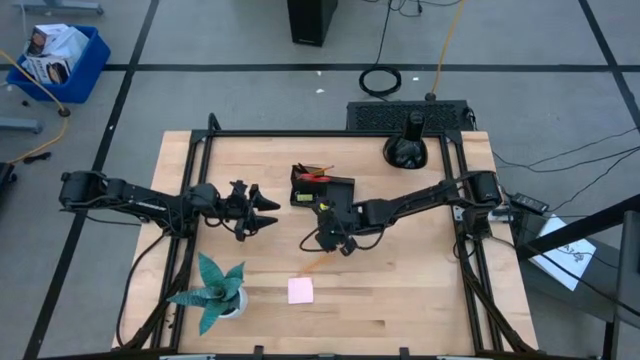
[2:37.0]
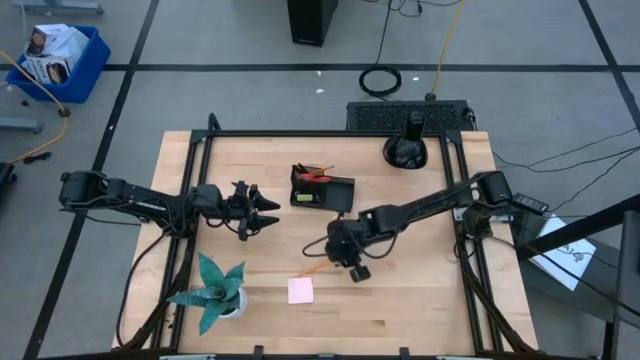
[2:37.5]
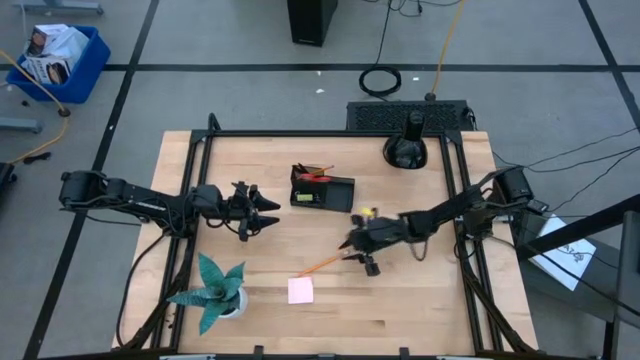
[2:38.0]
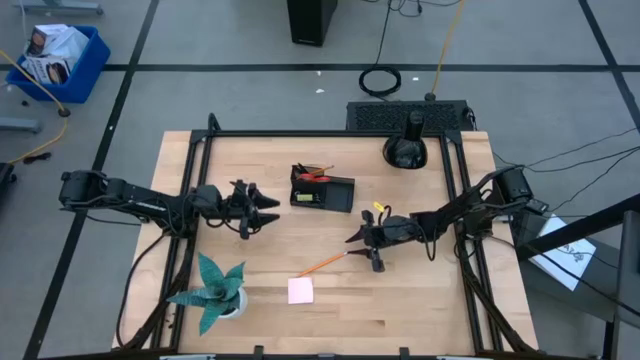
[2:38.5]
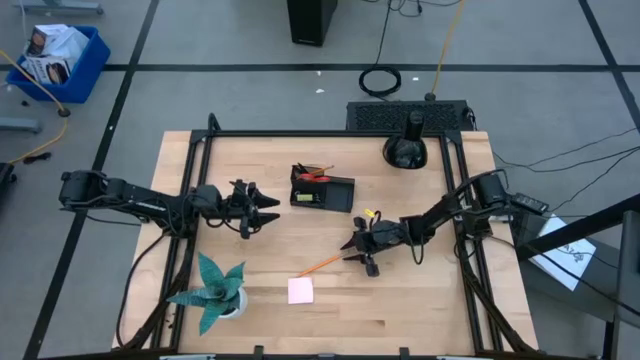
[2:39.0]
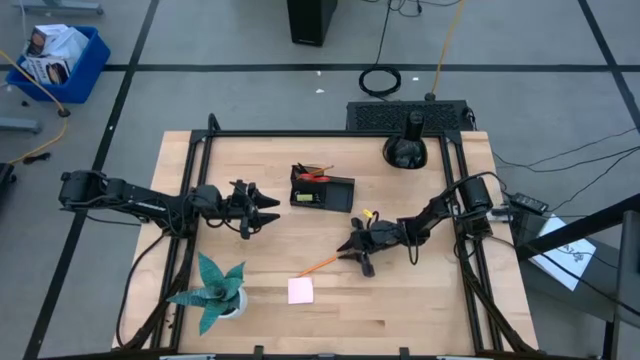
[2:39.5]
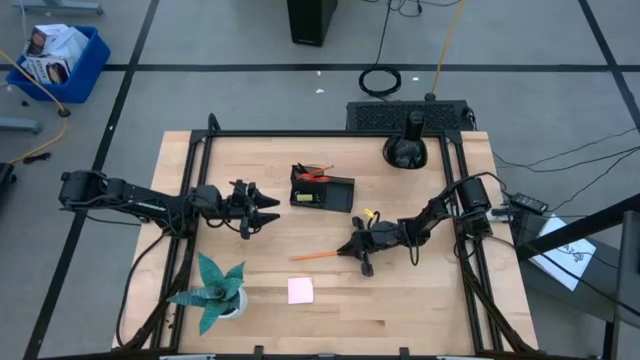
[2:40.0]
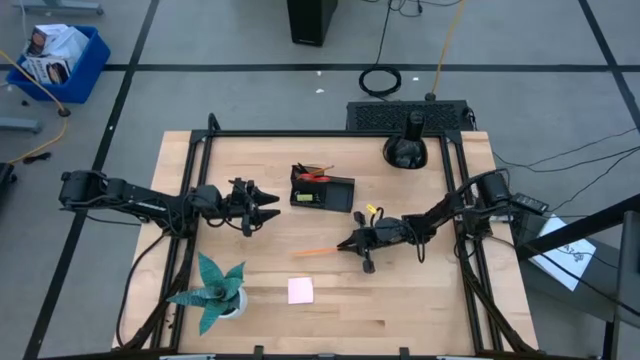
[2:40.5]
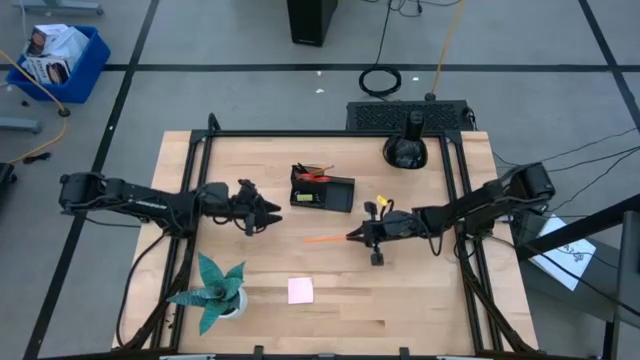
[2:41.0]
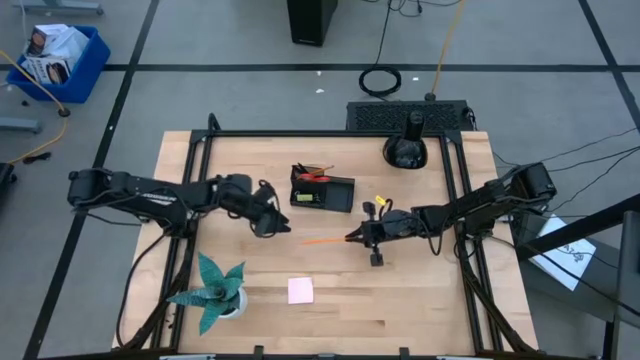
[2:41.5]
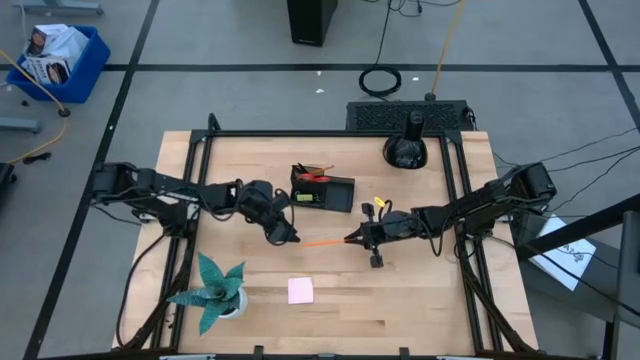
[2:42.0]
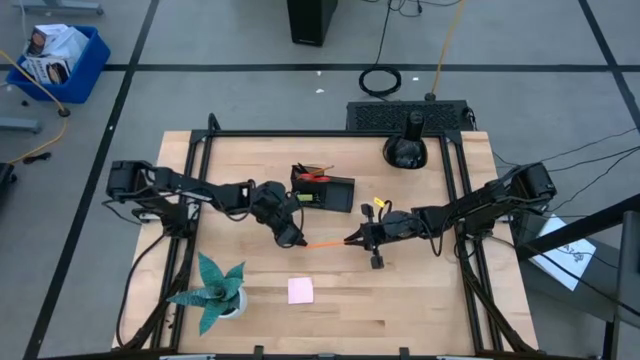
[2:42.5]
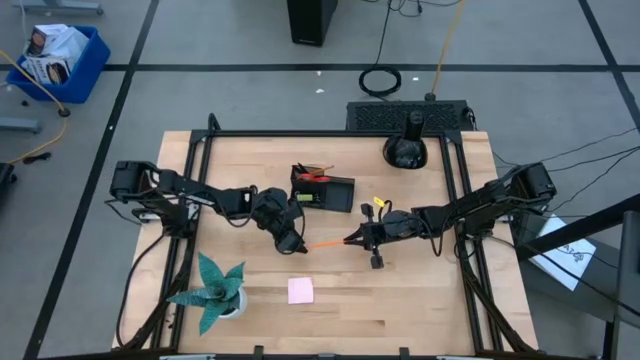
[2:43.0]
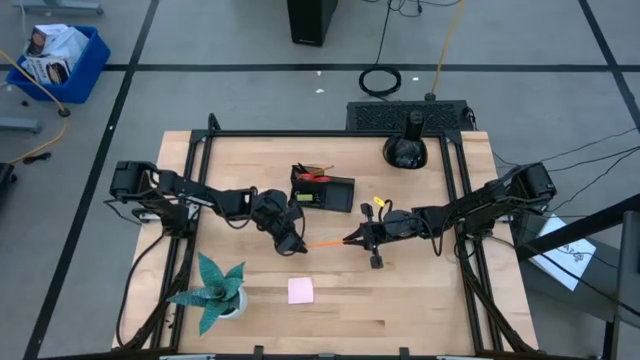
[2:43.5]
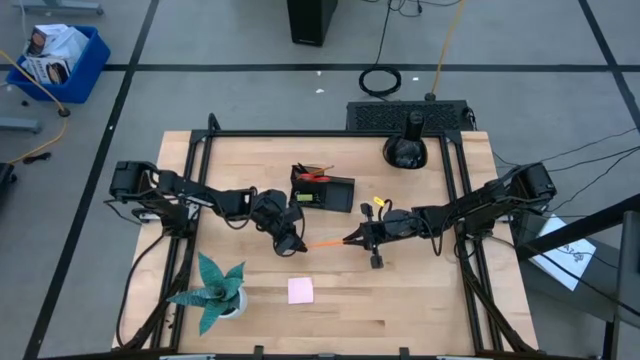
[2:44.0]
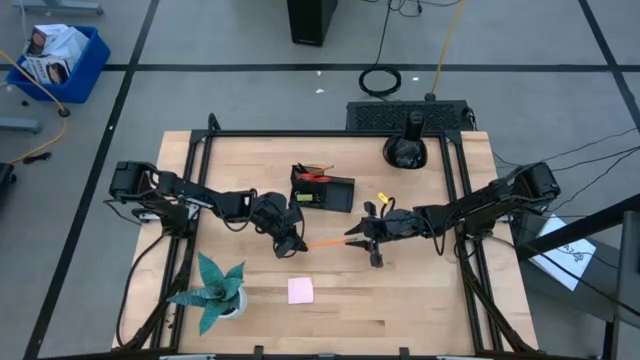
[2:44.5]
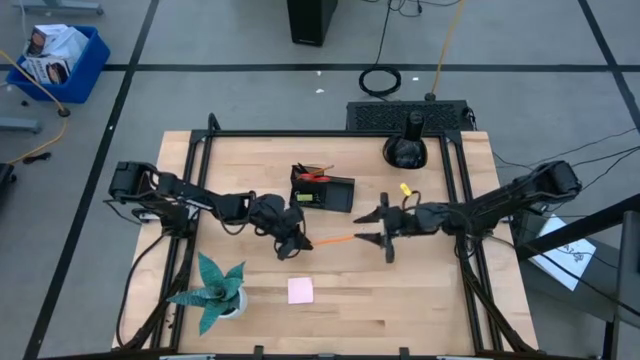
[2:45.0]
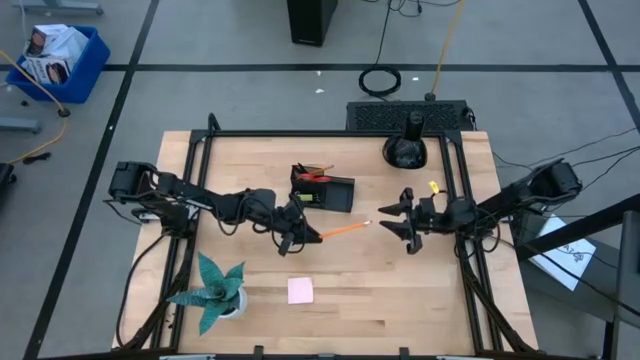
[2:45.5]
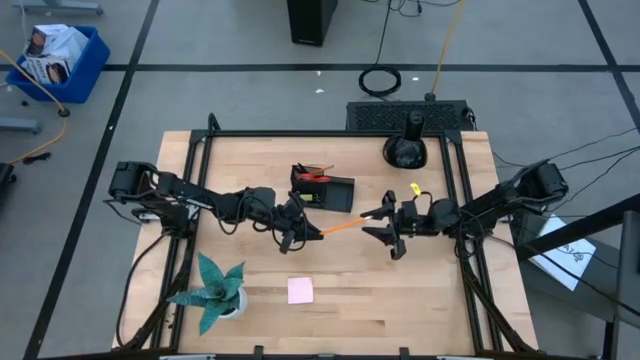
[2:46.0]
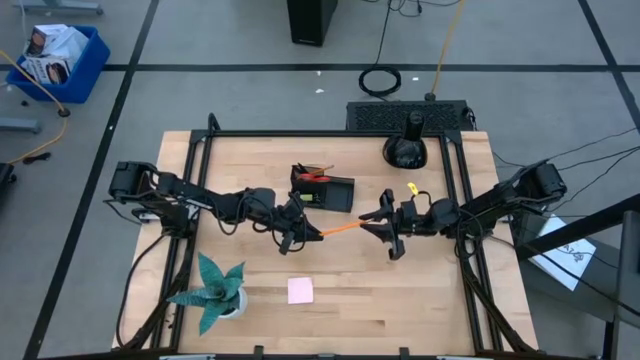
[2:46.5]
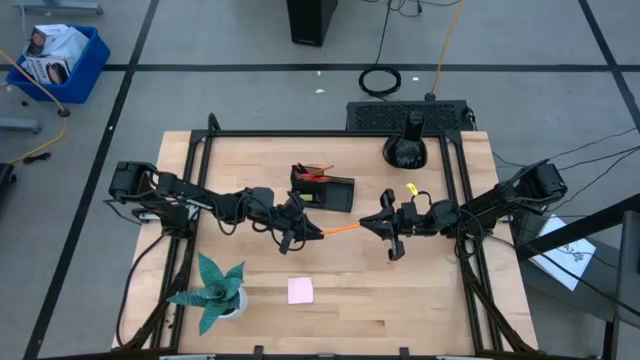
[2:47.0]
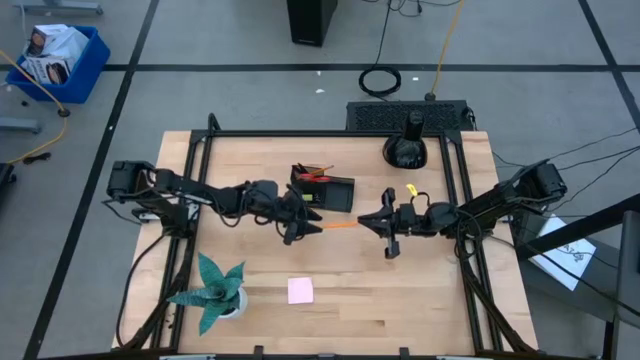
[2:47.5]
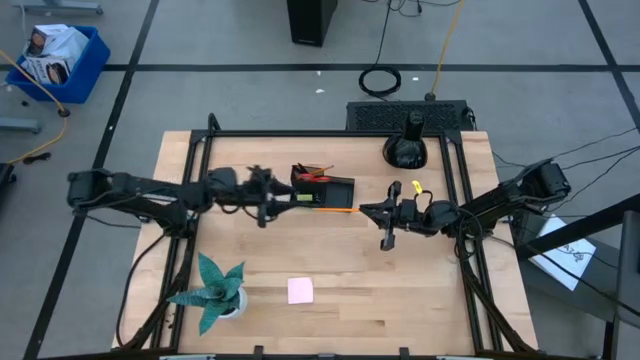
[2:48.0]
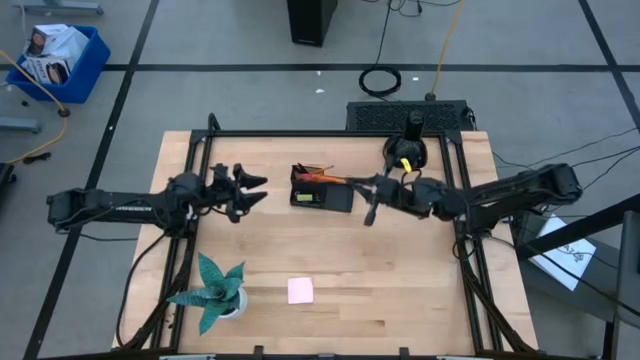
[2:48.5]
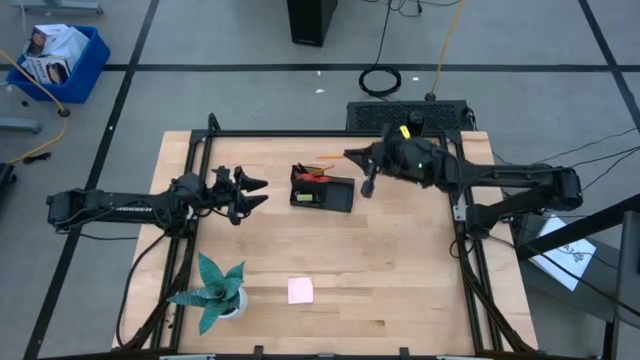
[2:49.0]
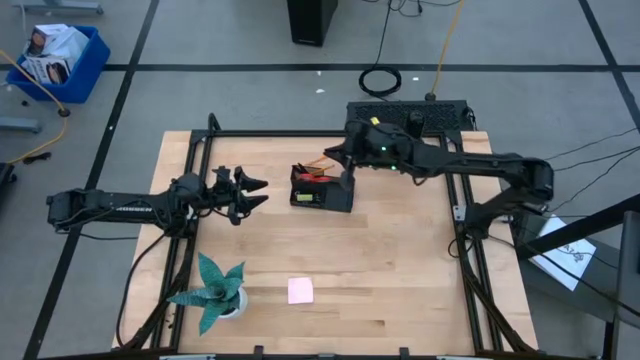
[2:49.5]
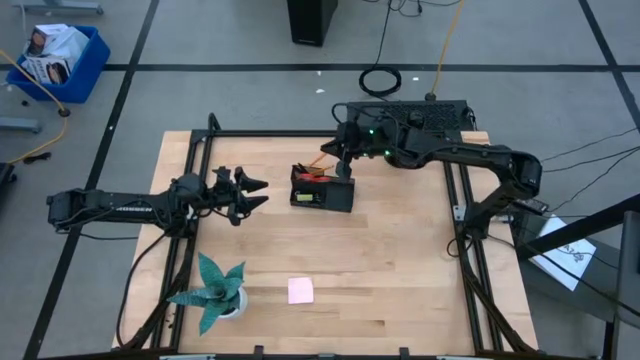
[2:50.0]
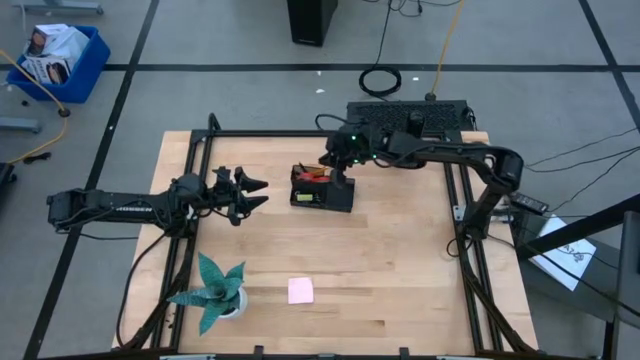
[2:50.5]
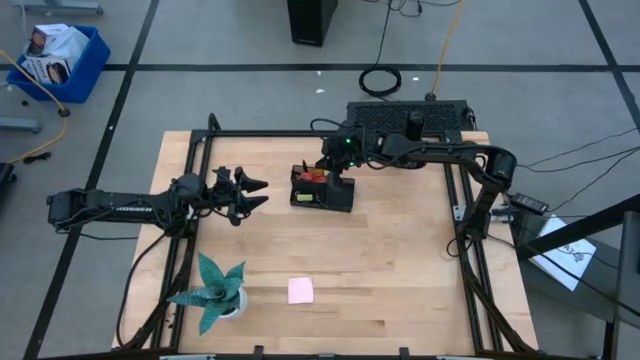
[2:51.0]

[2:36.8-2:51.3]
Task: Pick and place office supplies into organizer
Put the orange pencil into the black desk organizer

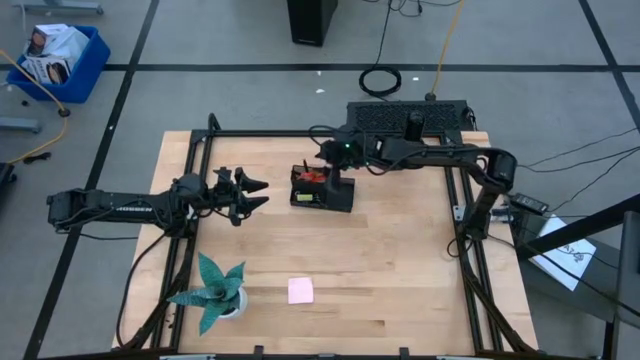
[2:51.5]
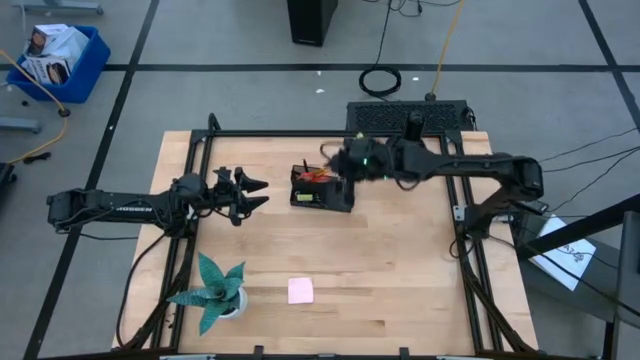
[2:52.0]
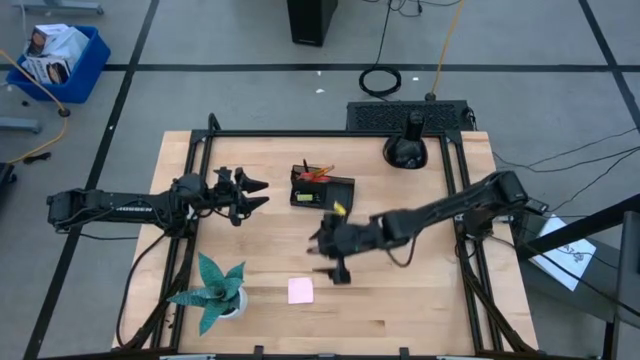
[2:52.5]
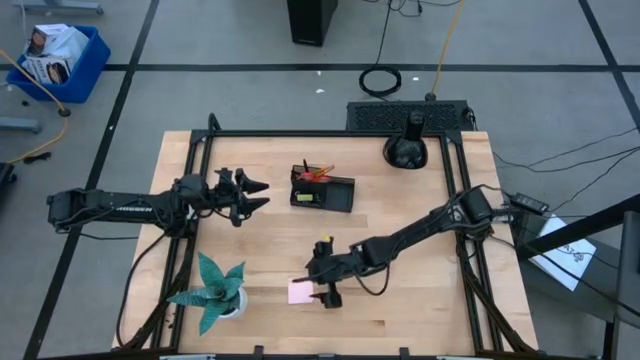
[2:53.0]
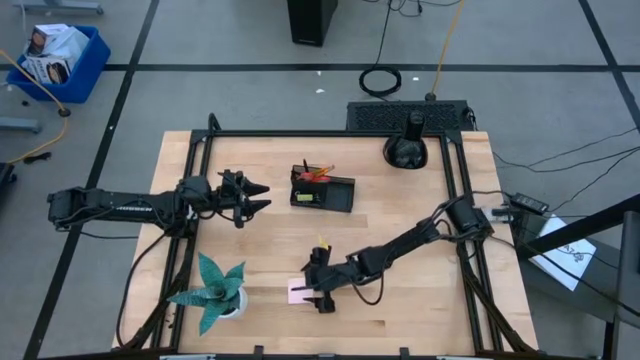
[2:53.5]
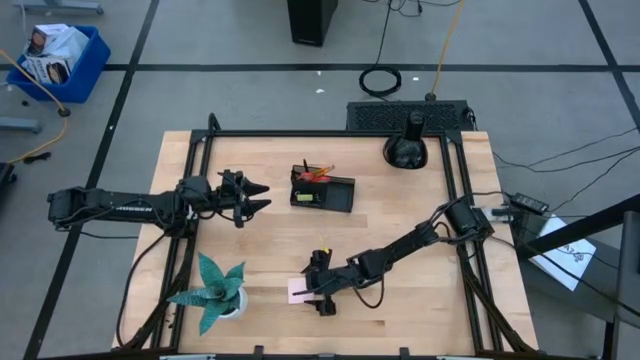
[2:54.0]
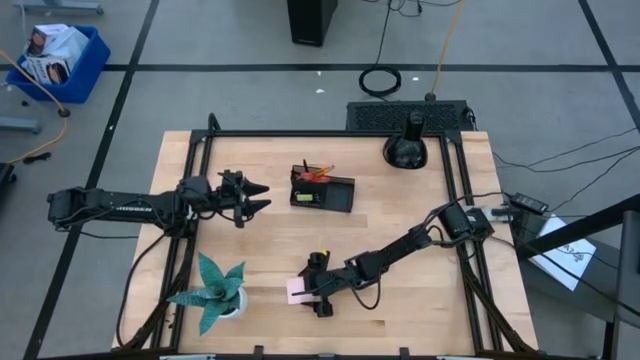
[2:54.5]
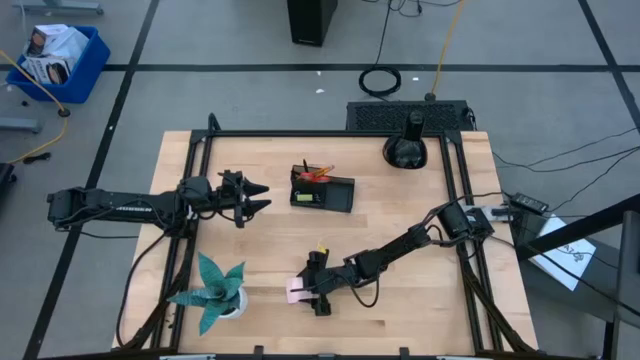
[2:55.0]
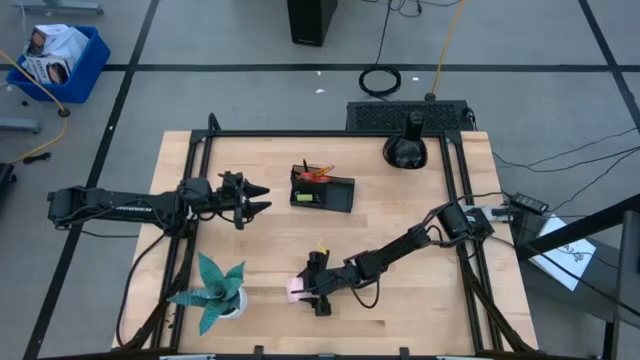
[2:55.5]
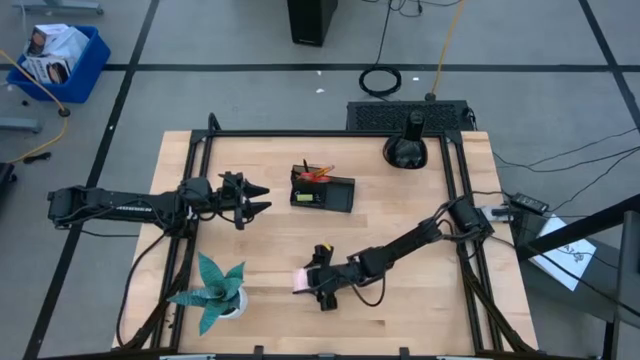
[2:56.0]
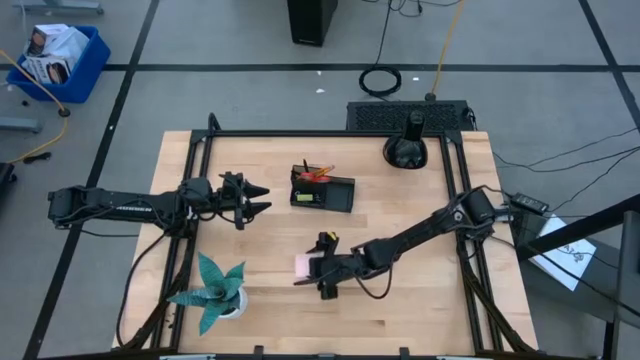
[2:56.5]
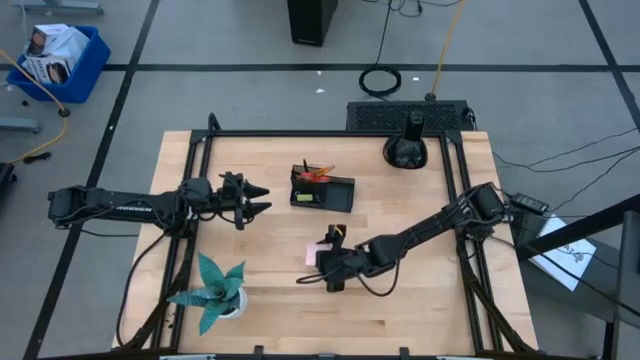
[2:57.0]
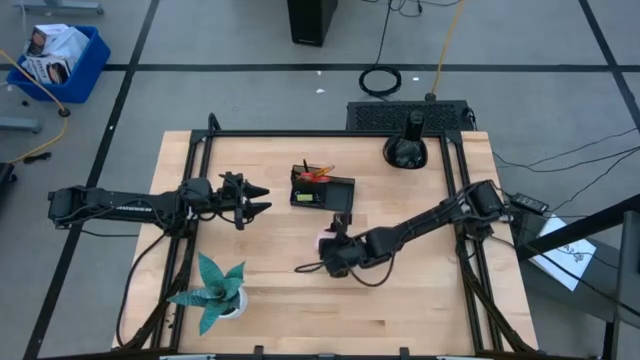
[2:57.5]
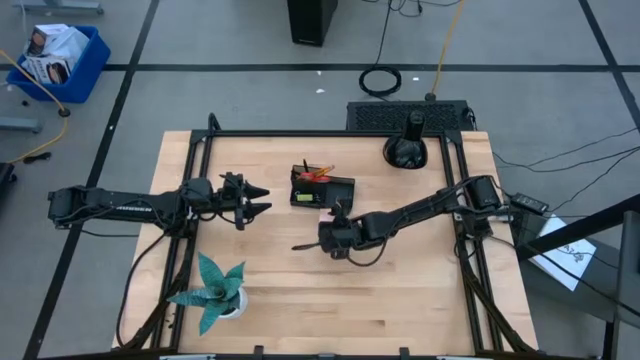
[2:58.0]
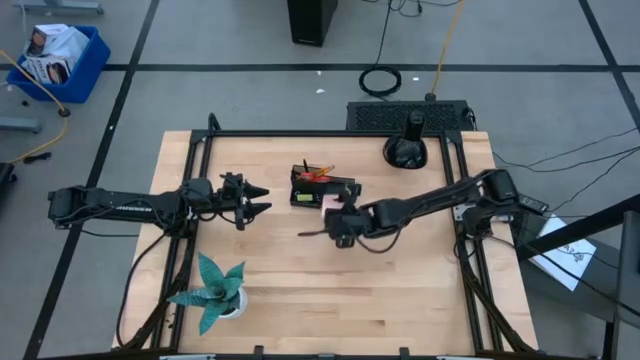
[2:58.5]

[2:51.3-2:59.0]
Put the pink sticky notes into the black desk organizer
